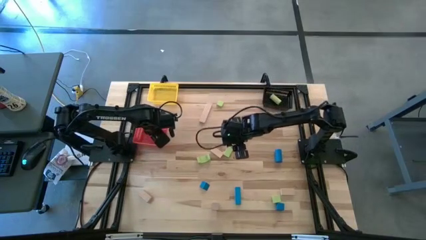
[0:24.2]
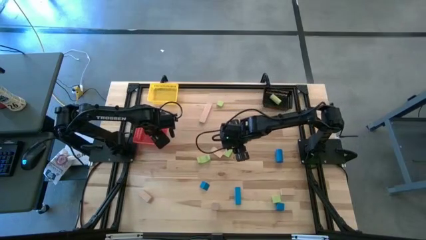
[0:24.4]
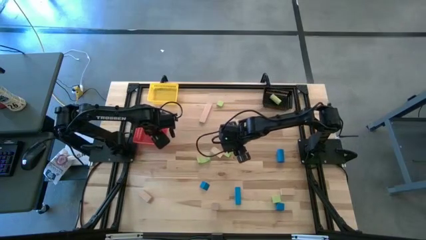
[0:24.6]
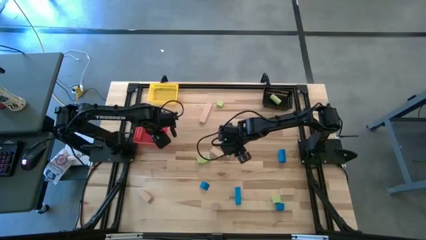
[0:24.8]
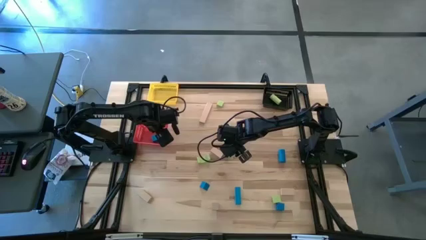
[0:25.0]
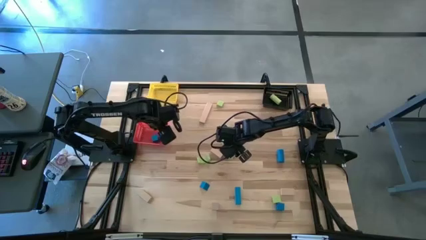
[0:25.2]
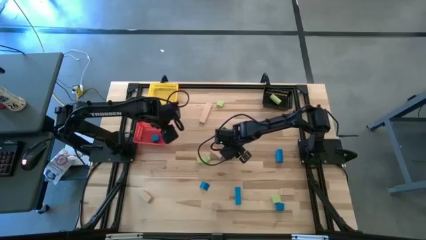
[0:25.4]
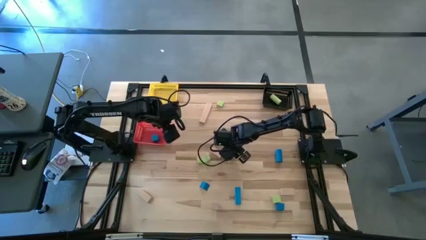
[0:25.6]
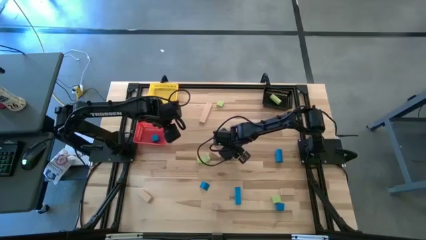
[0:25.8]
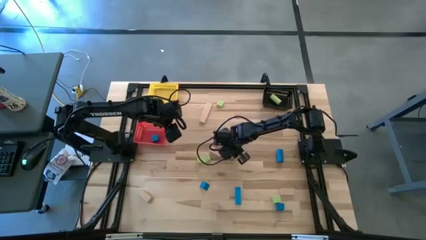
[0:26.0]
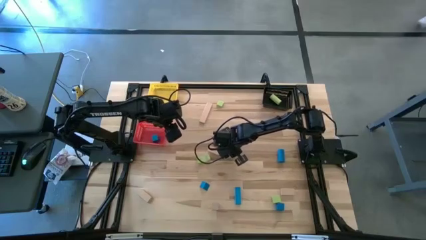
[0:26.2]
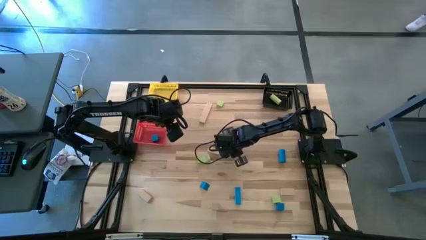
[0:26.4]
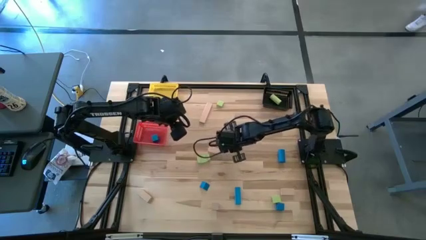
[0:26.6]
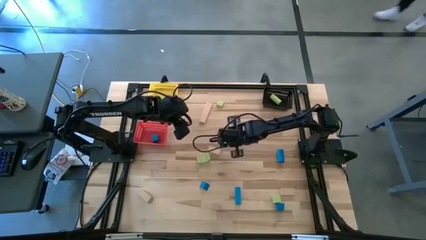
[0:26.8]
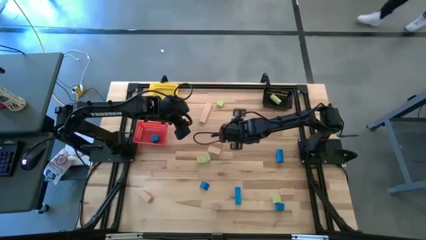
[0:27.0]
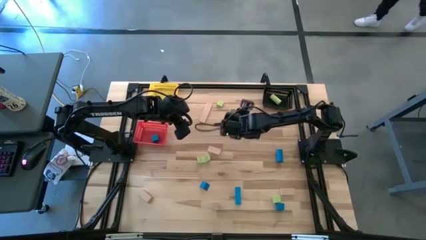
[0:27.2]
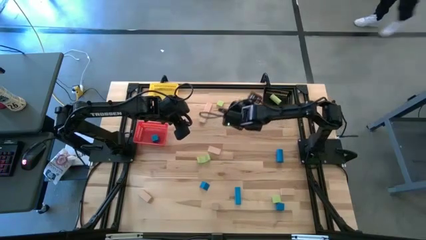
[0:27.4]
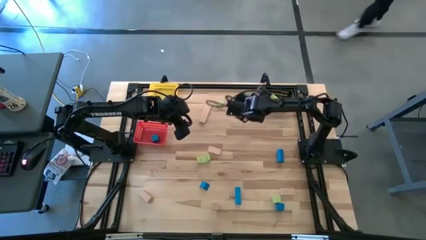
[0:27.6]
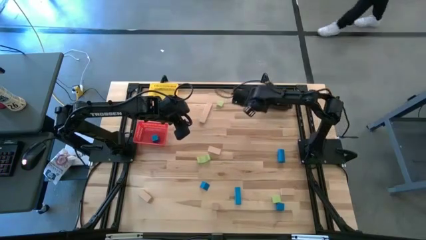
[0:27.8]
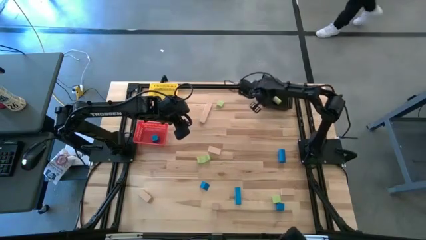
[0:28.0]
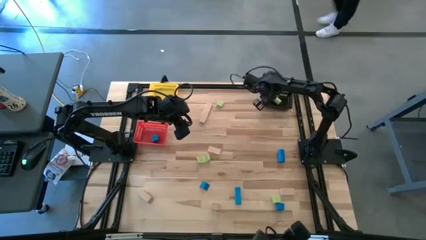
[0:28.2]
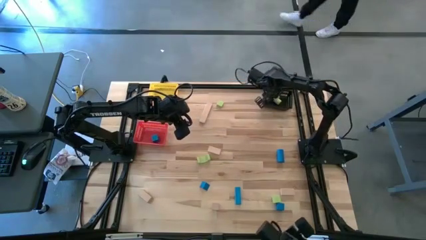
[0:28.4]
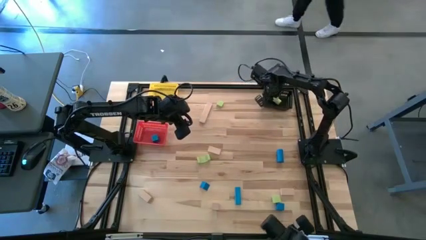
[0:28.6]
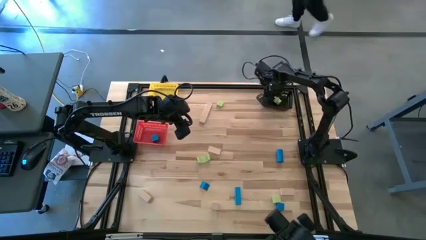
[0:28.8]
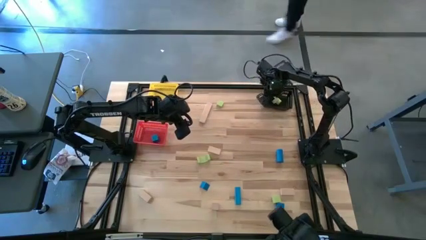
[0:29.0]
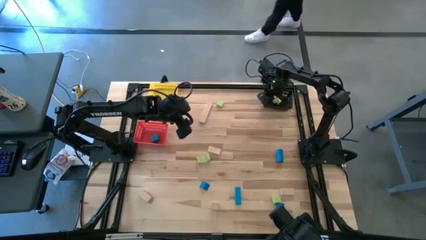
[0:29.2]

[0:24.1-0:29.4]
Task: Sort & place blocks by color
Put the green block into the black bin

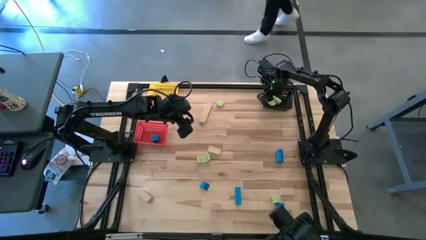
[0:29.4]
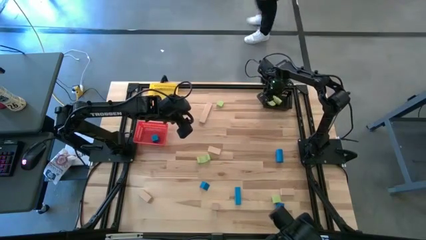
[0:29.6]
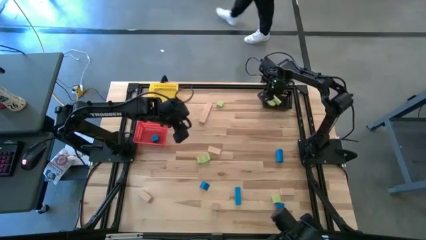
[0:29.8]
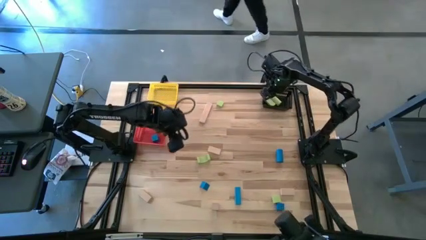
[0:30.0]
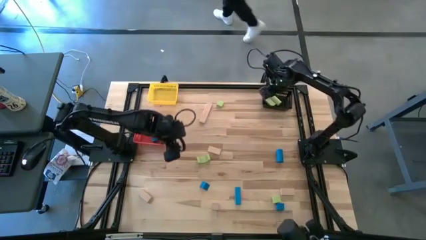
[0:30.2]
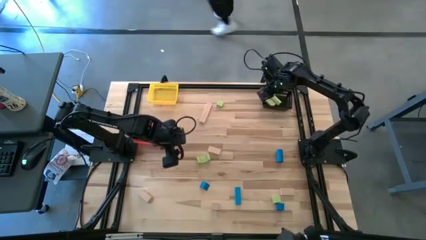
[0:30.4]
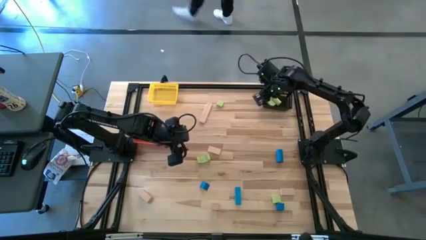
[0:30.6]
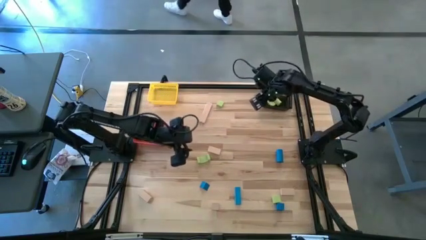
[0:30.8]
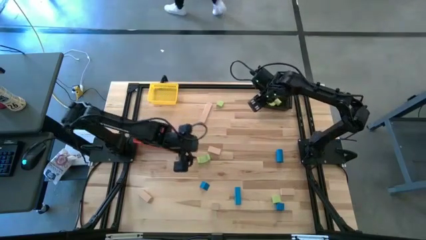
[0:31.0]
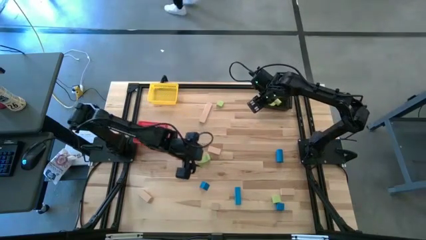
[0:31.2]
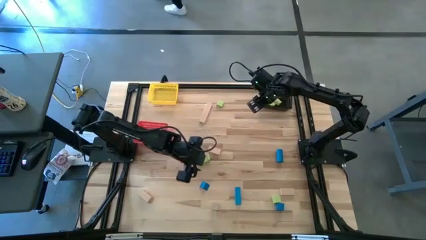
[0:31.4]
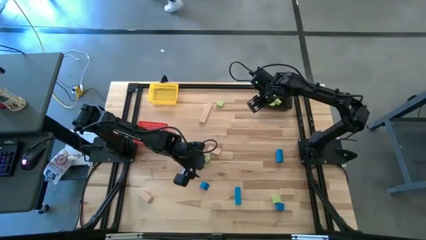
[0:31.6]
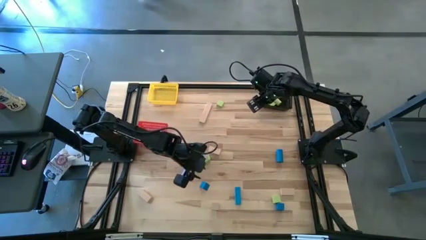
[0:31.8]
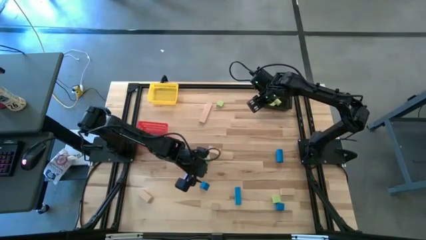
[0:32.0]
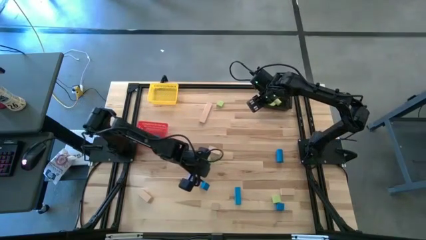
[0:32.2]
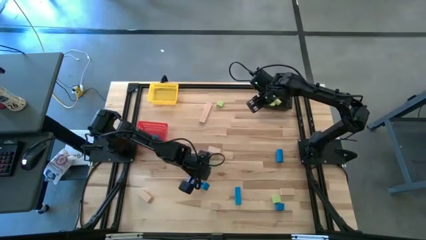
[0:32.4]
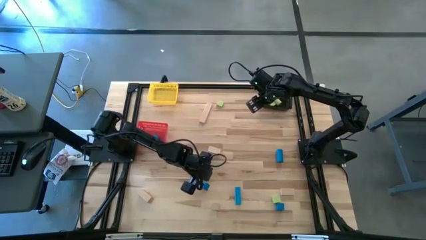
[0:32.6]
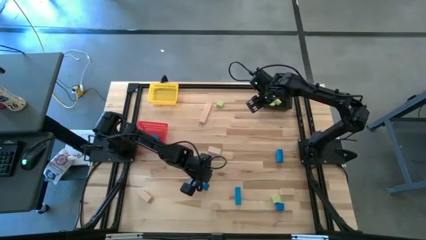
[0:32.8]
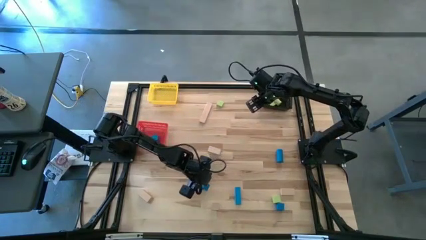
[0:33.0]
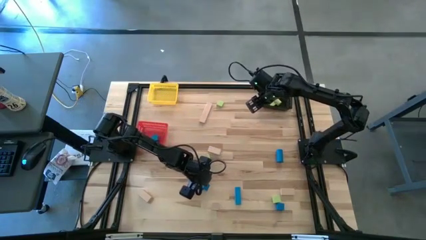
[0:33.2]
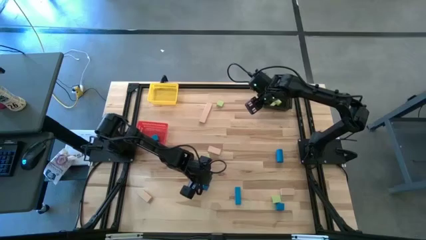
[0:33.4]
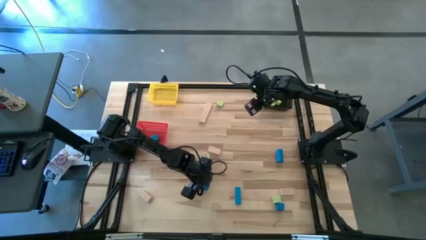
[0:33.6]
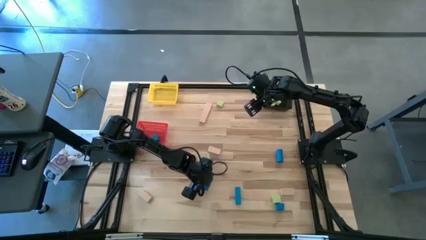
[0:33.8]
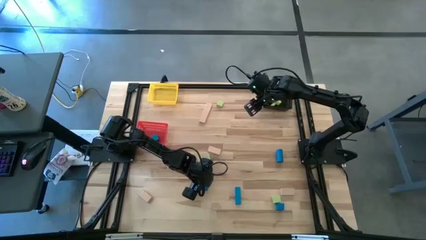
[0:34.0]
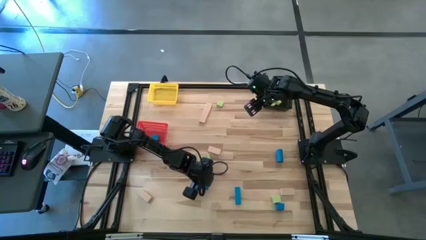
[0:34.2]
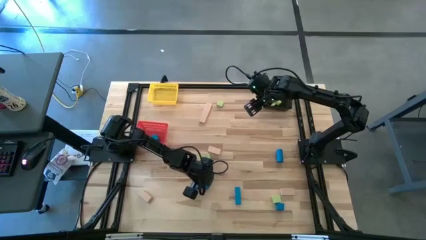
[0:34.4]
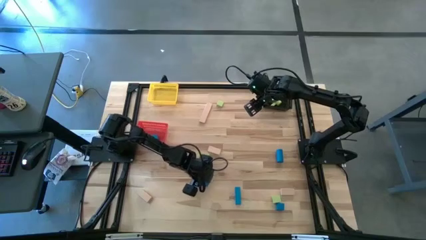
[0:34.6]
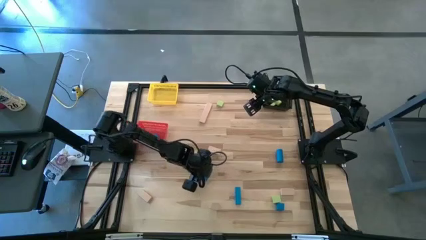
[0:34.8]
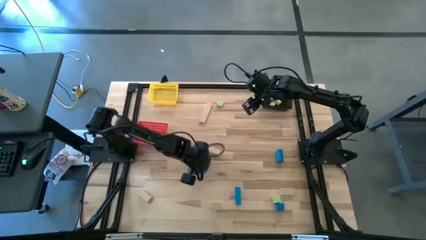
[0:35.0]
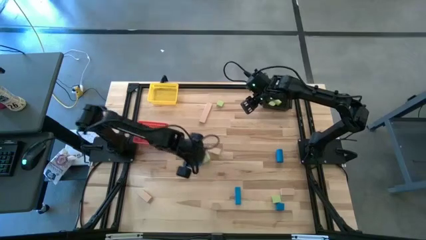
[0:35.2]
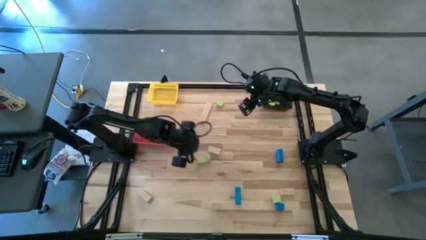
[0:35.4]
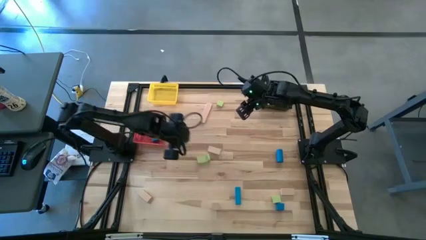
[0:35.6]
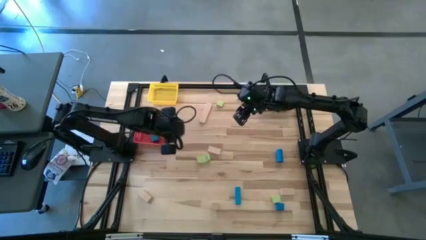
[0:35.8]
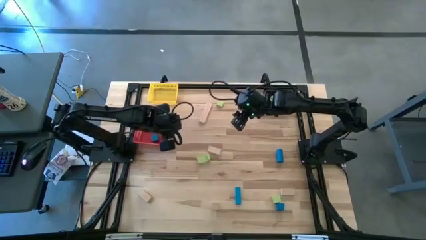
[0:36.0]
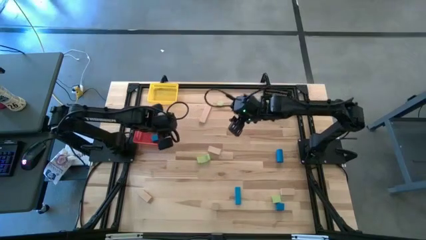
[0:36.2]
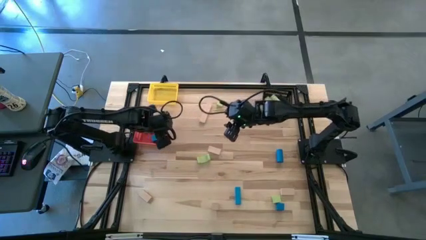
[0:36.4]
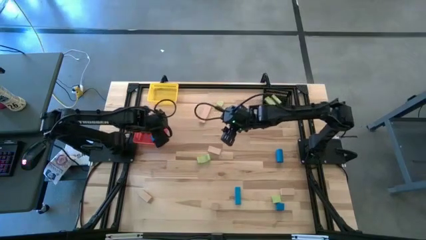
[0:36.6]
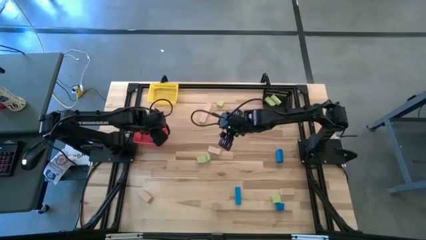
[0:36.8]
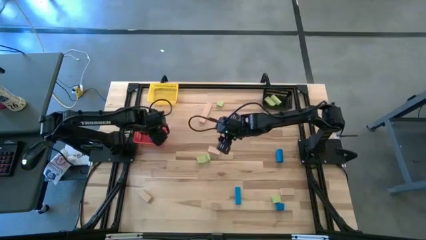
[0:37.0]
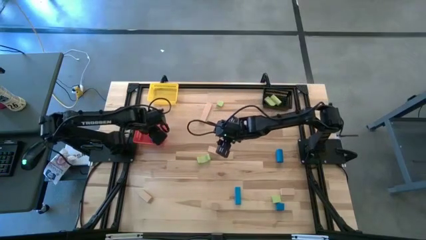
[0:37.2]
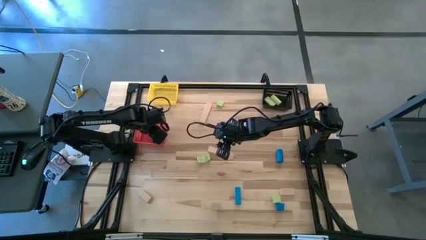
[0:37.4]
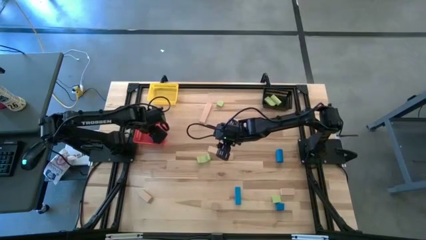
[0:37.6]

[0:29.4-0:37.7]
Put the blue block into the red bin

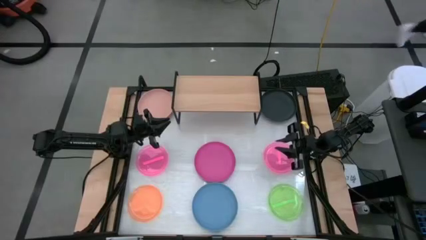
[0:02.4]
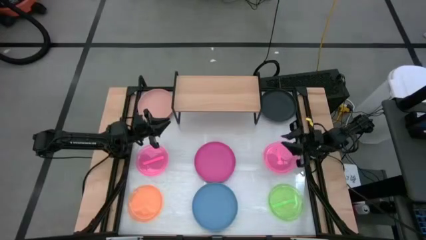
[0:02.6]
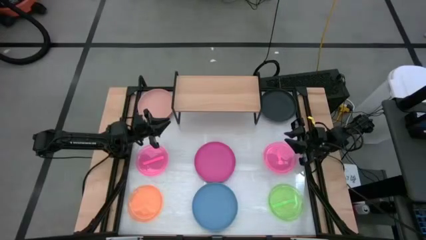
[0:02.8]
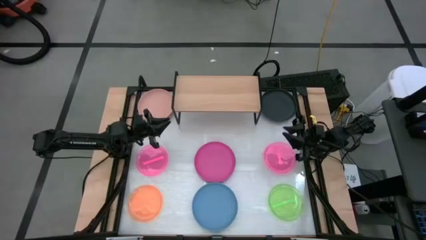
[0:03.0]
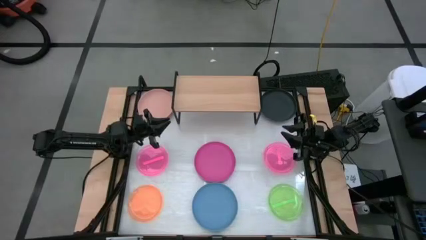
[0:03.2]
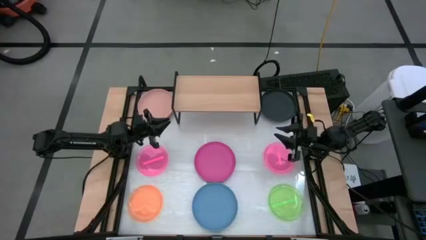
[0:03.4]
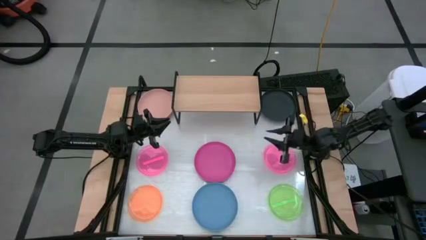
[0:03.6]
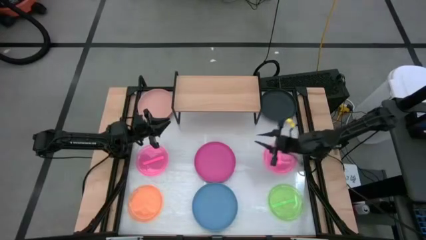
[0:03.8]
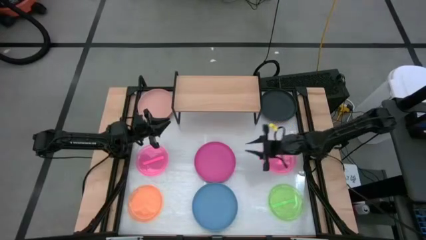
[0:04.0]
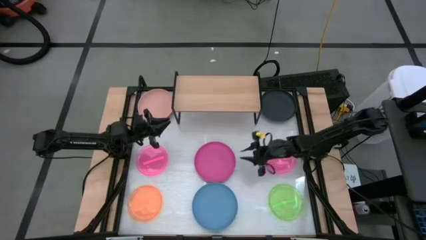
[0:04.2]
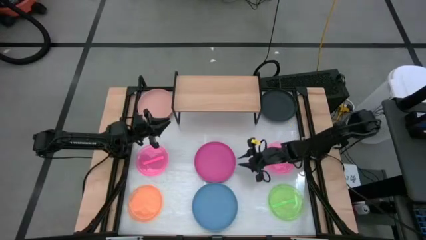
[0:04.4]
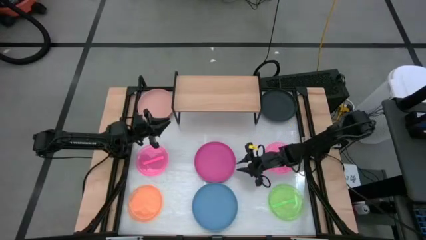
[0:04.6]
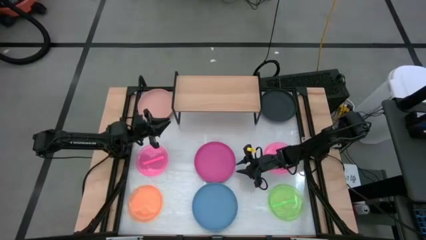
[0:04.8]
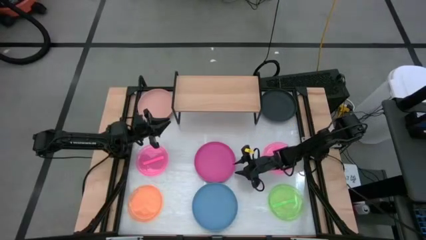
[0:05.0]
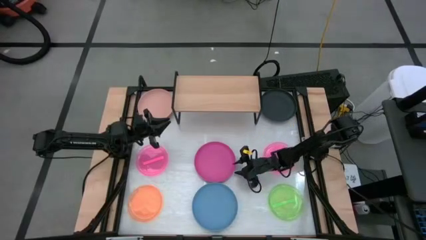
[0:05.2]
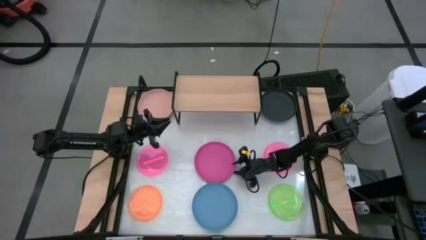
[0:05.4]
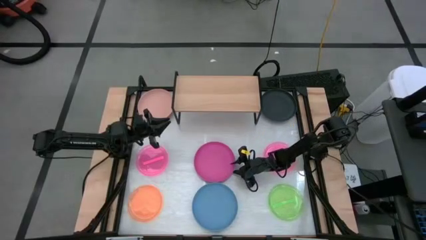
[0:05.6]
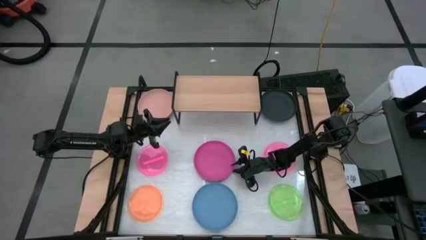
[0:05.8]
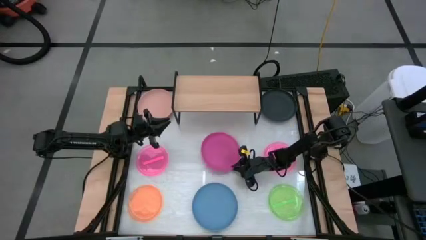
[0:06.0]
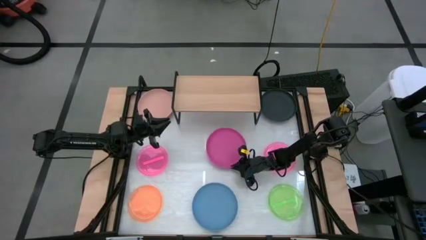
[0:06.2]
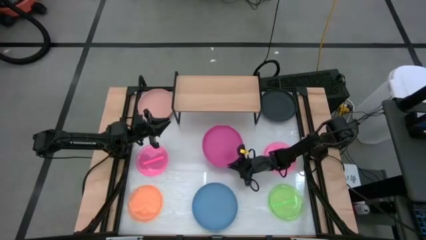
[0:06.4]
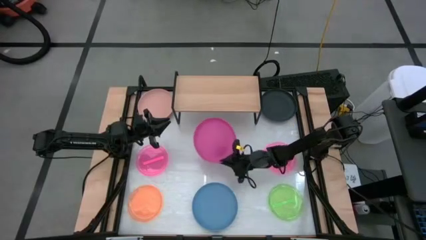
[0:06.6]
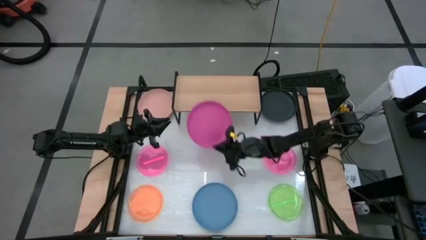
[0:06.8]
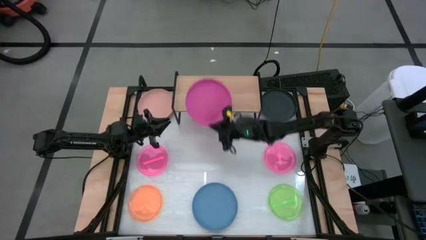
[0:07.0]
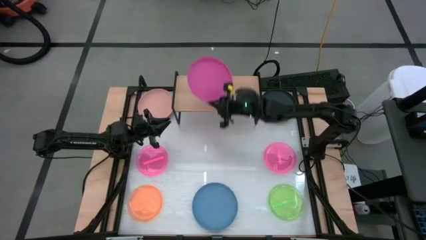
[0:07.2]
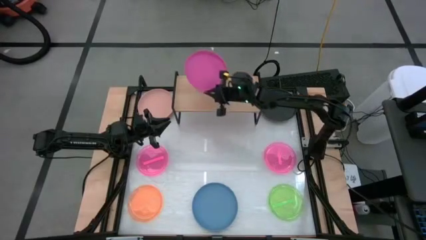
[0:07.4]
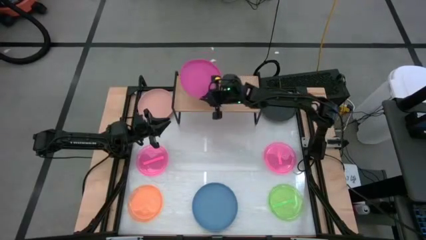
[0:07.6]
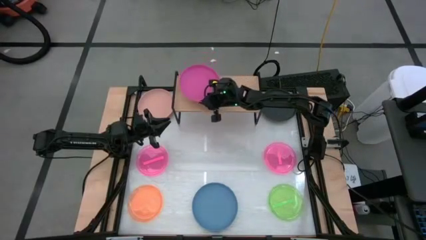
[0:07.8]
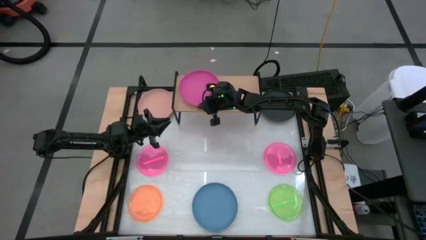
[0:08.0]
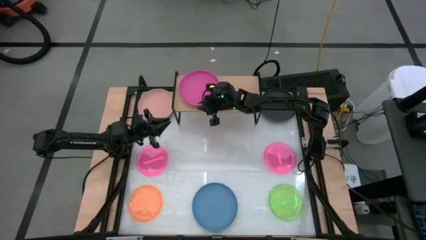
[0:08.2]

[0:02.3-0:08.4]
Task: Place and stack plates onto a shelf
Put the large pink plate on the shelf
